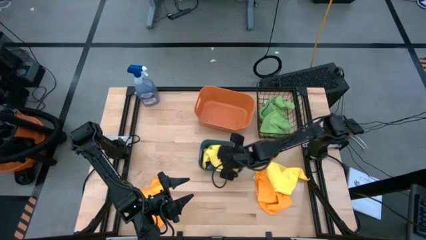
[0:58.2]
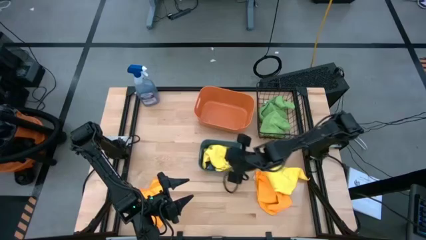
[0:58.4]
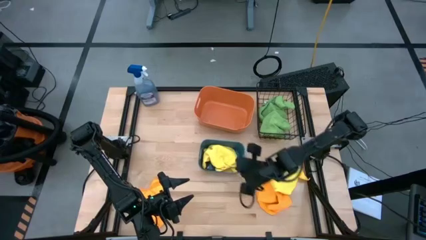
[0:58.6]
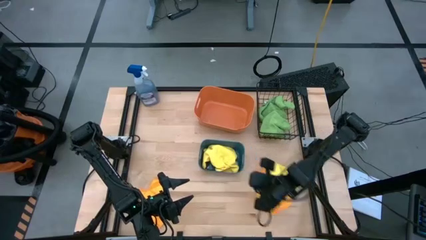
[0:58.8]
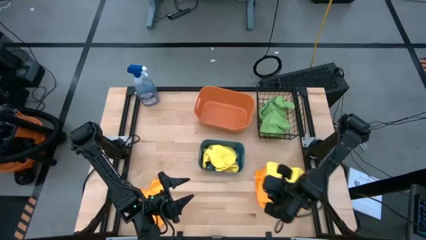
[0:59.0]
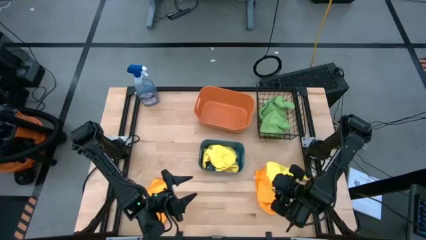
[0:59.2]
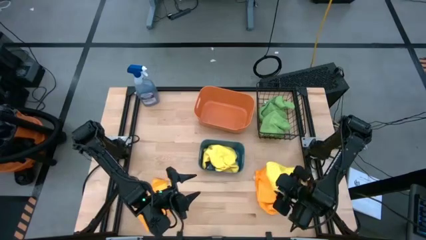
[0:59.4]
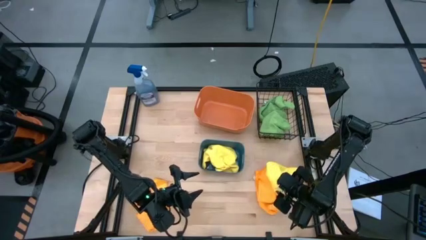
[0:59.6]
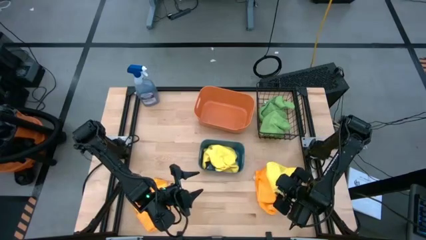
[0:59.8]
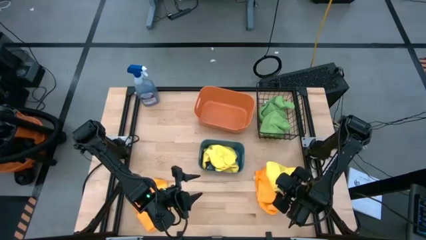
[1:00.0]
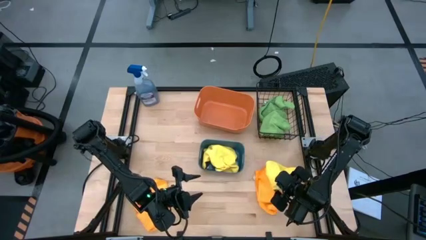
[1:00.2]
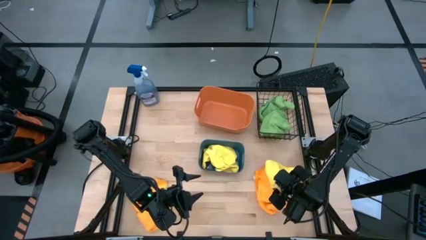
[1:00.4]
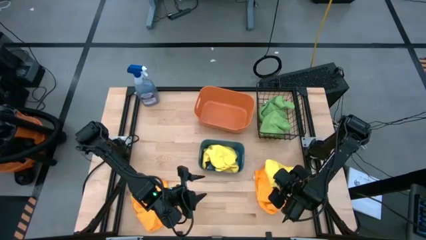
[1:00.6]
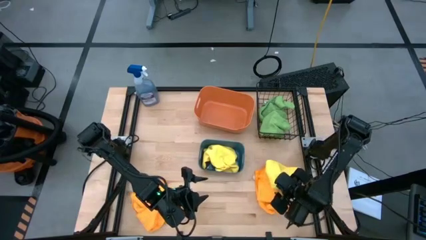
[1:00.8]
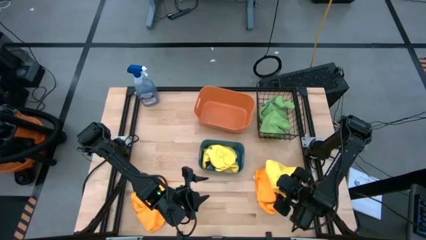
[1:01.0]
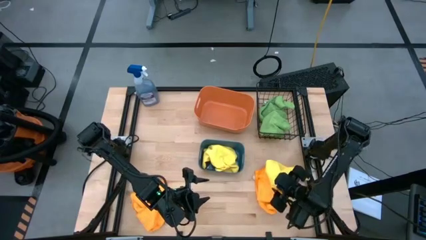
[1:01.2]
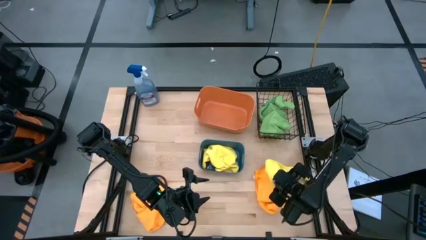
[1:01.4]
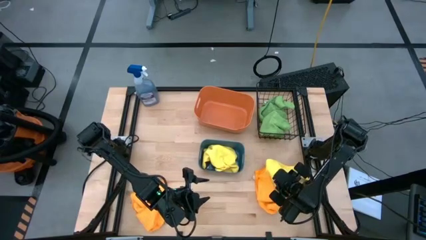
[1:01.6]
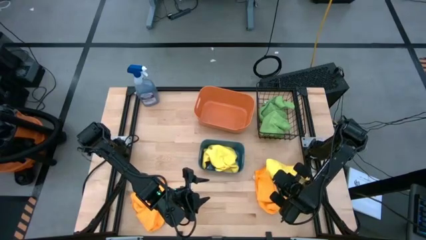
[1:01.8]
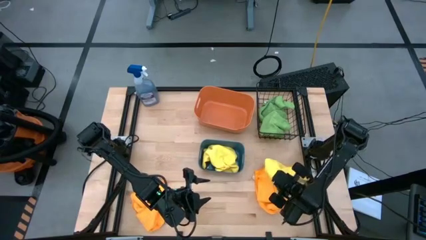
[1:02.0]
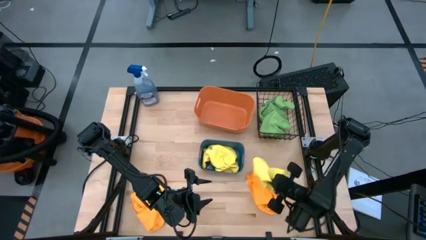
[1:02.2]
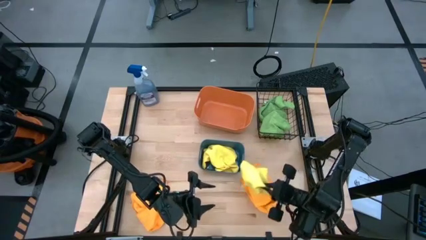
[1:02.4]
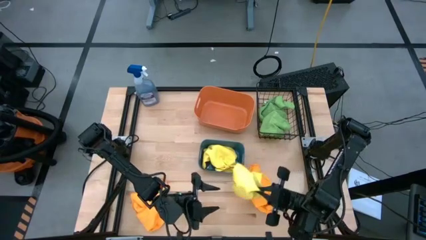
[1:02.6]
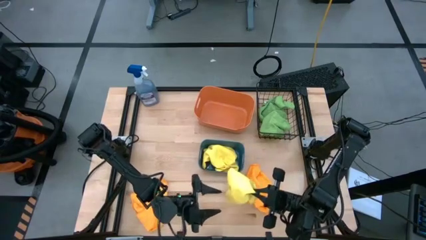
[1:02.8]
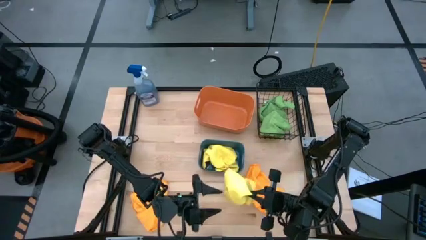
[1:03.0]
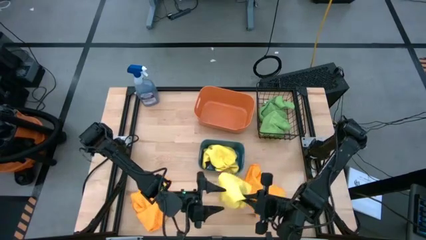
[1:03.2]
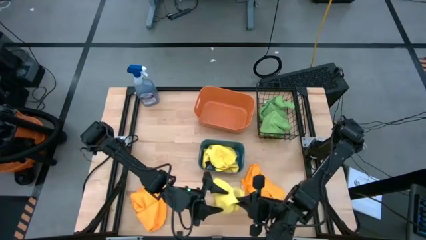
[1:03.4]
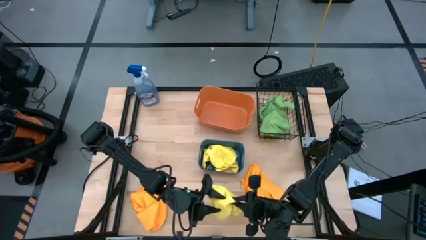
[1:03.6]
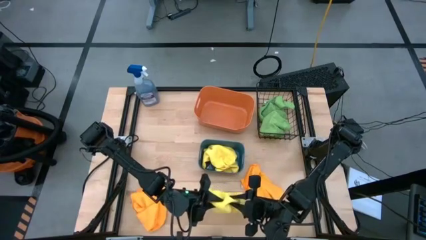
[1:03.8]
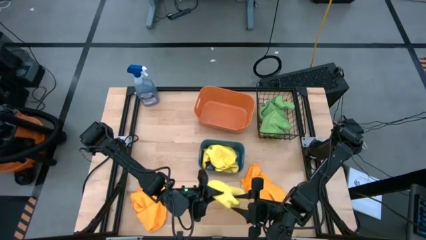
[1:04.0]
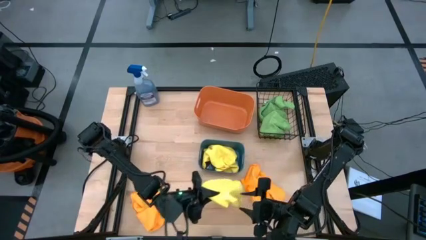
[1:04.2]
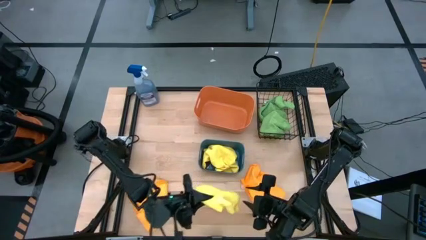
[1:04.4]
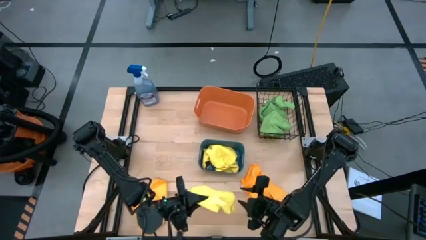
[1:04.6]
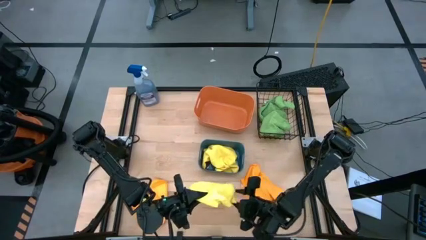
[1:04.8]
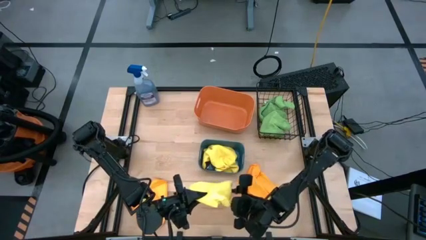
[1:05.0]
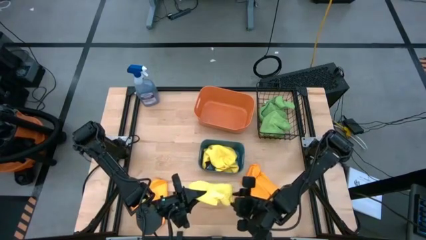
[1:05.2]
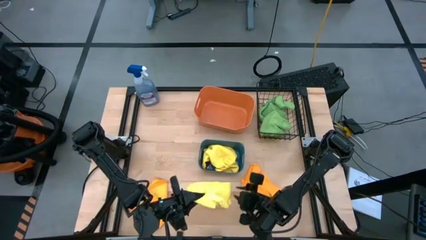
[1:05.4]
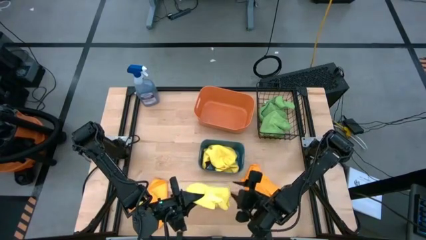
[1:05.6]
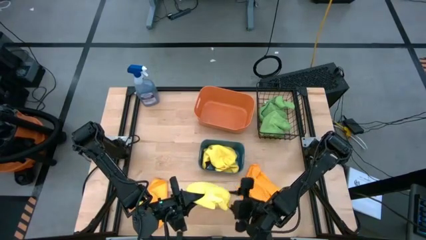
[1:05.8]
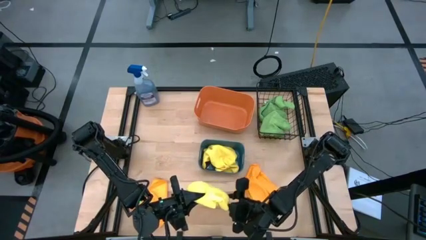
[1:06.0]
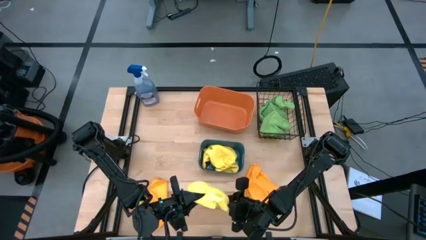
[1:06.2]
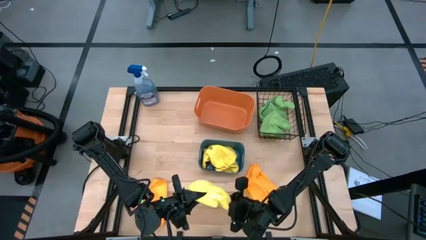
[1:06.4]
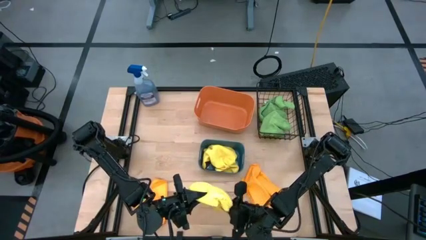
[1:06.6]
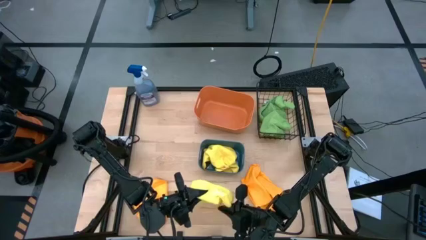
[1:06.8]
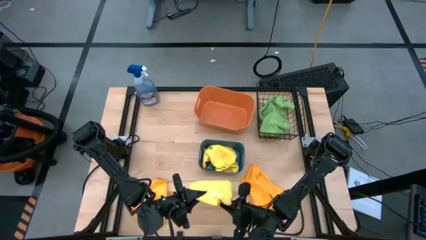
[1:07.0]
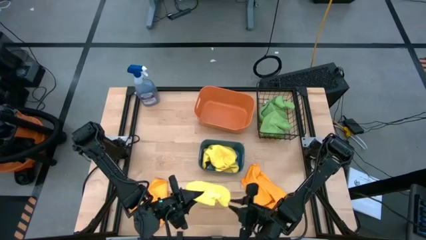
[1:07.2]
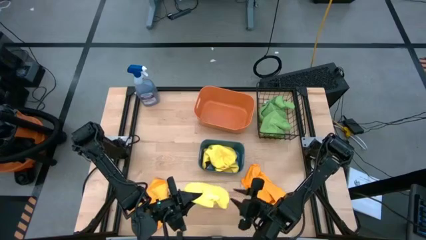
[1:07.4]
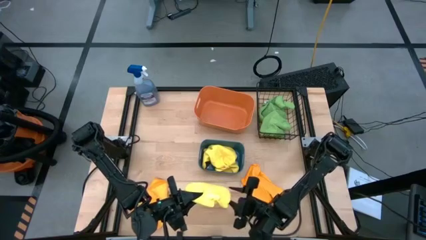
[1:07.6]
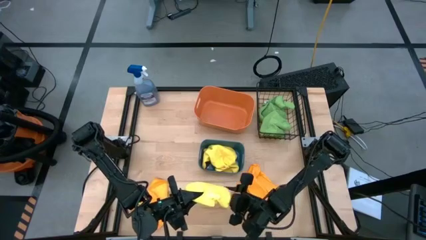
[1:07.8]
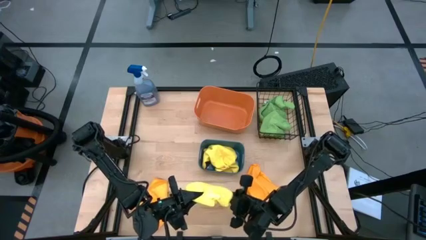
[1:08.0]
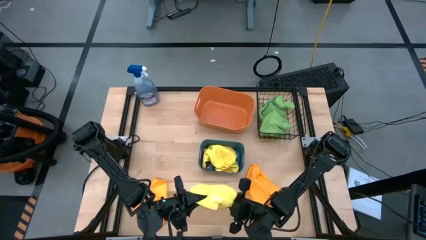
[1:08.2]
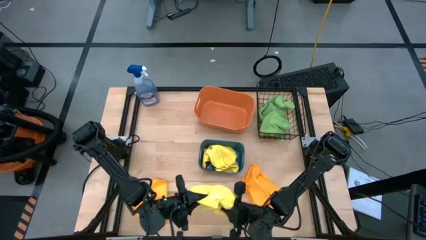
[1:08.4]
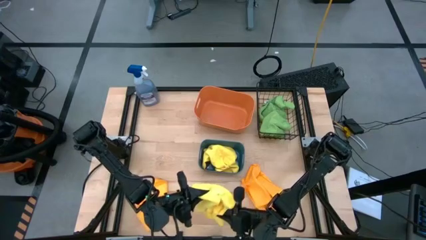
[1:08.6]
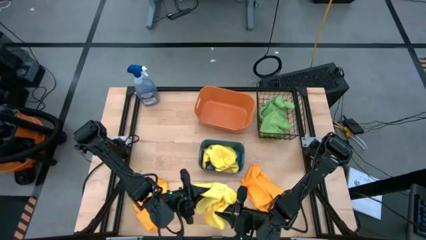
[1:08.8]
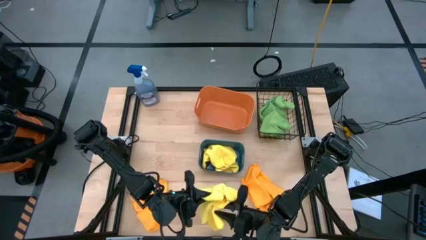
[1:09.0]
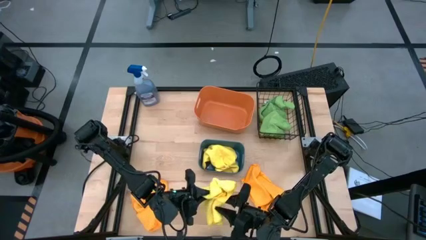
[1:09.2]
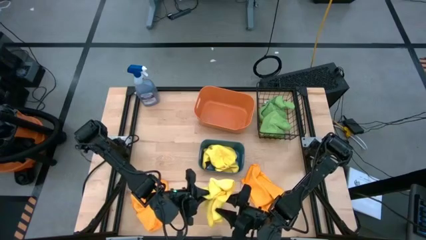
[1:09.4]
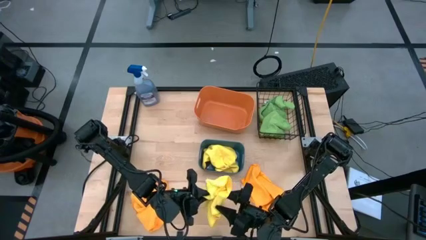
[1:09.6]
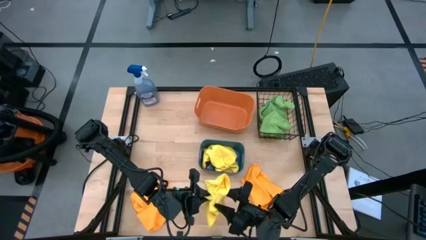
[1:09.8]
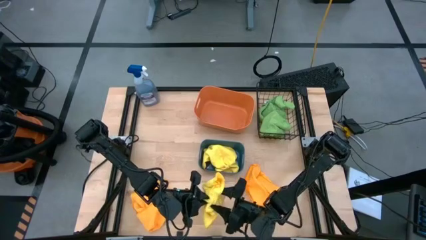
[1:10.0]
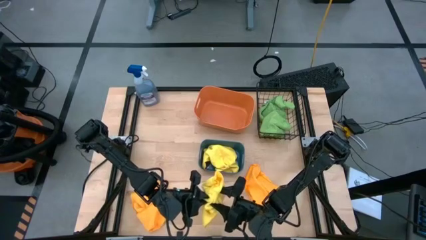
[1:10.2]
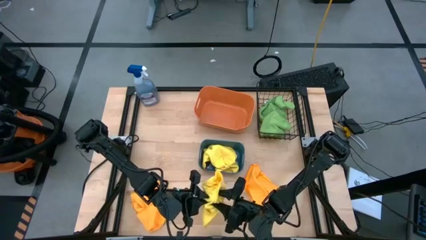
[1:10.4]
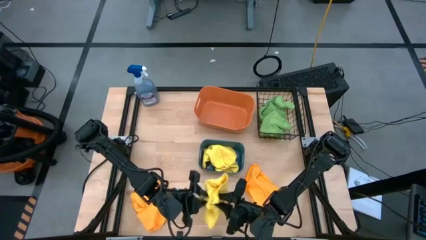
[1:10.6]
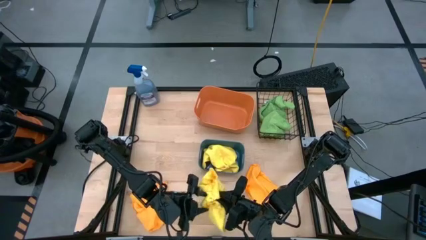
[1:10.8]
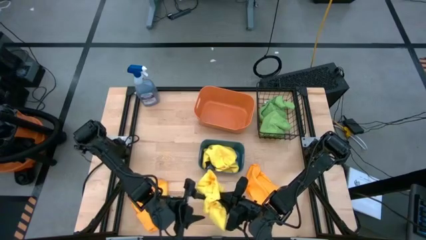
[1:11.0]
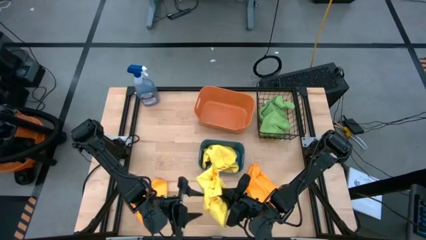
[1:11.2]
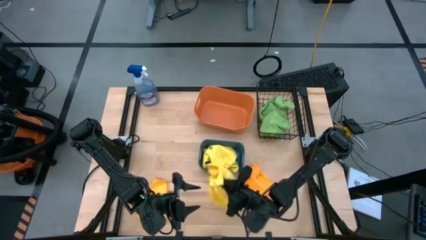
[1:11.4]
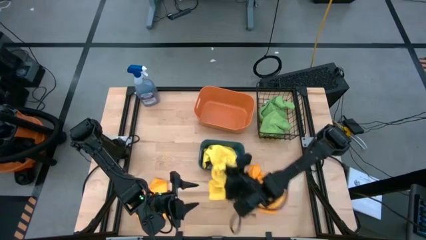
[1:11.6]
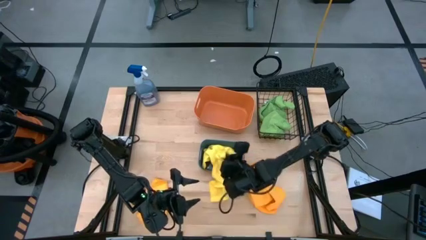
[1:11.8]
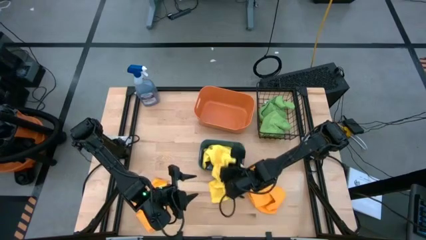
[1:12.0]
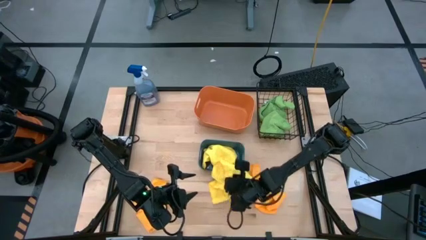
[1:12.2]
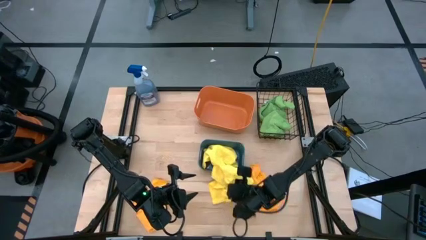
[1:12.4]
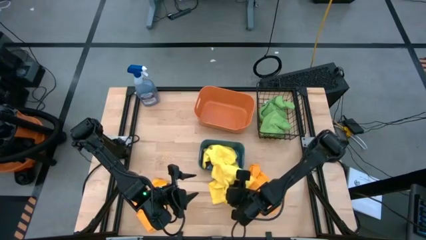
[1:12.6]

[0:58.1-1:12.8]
Task: Sort microfiber towel by color & place in baskets
Put the yellow microfiber towel into the blue bin

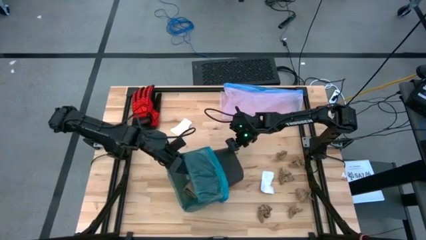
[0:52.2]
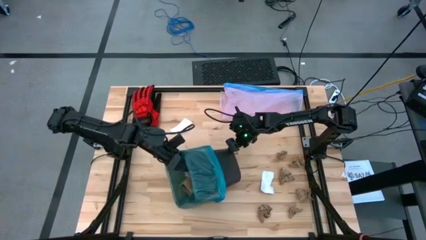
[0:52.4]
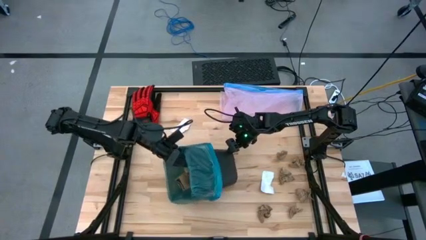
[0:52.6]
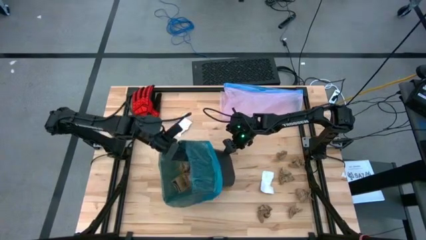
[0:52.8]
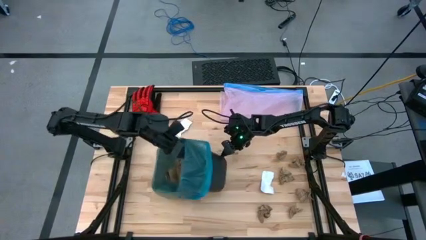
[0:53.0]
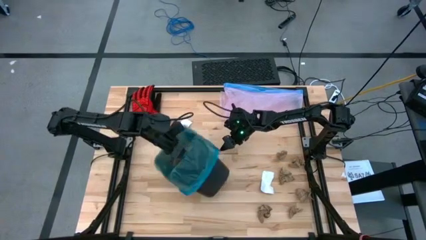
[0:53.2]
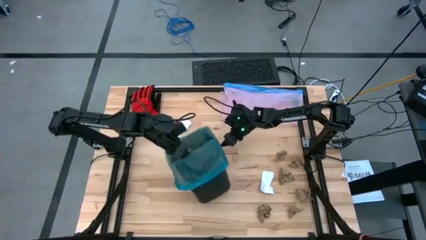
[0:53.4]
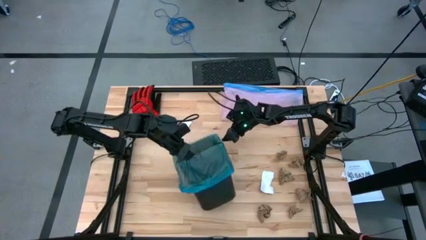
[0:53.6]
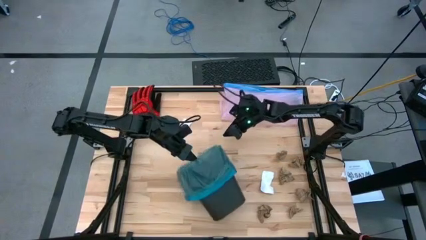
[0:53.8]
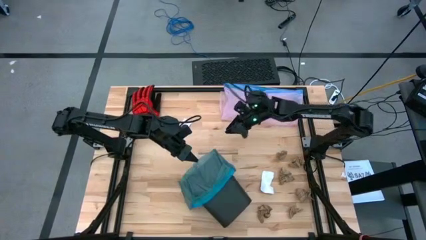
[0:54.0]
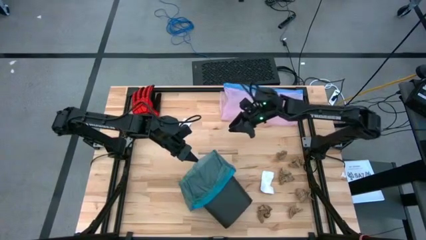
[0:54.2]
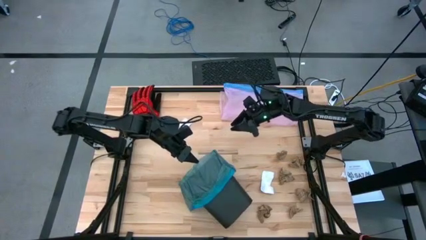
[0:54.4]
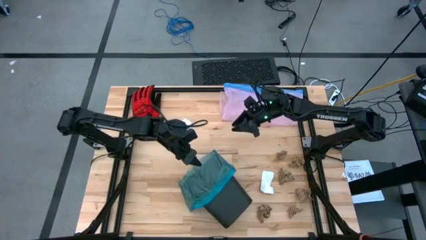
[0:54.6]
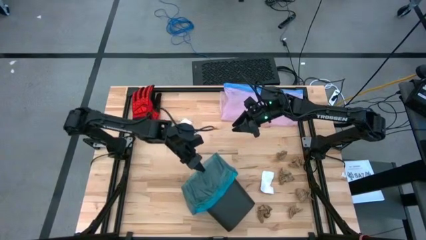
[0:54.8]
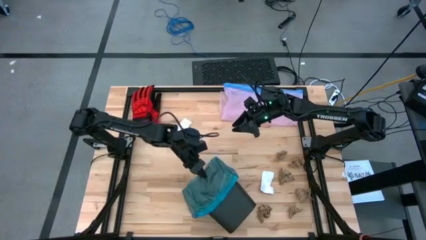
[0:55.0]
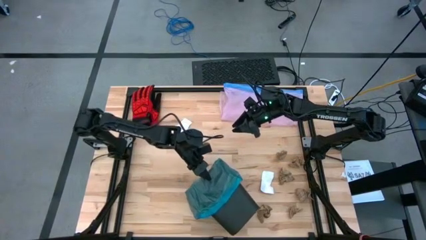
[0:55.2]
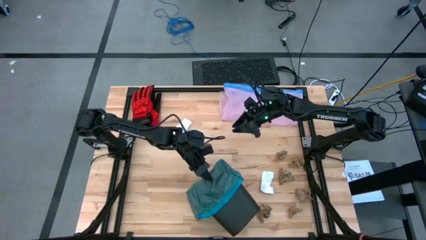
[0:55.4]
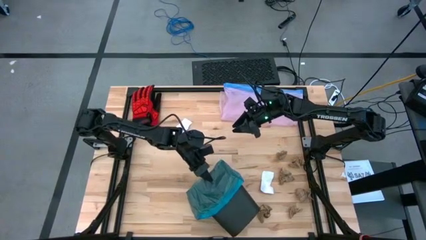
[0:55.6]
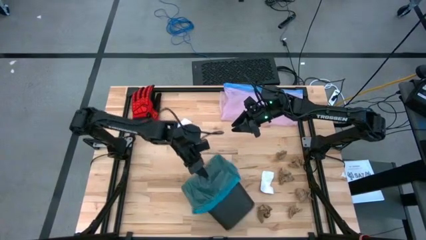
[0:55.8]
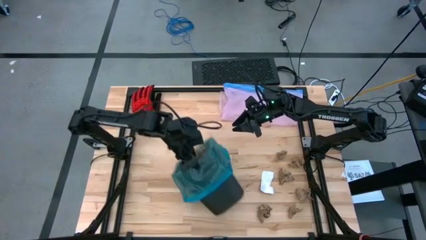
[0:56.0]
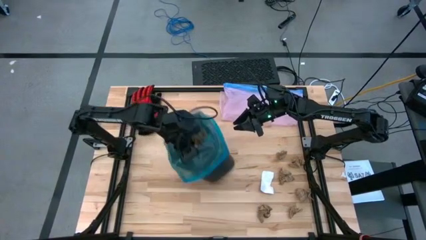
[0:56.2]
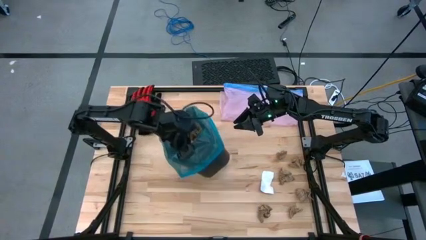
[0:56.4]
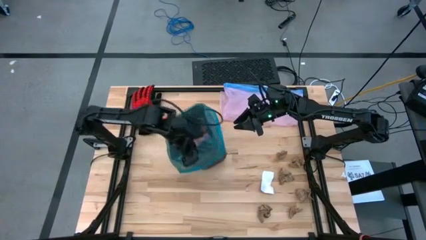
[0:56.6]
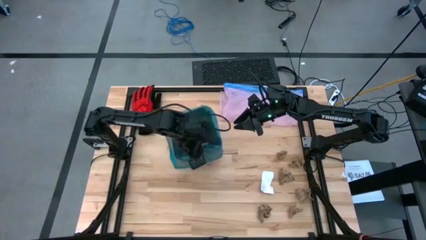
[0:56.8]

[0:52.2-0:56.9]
Task: place trash/remove bag and relplace
Adjust the black trash bin
